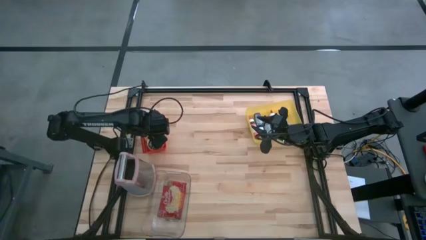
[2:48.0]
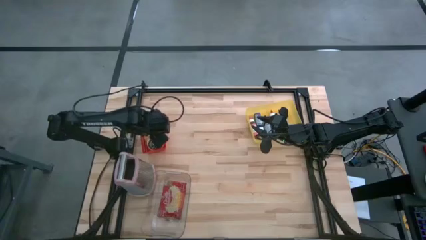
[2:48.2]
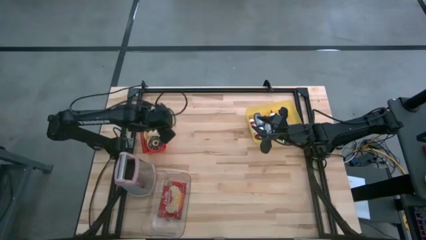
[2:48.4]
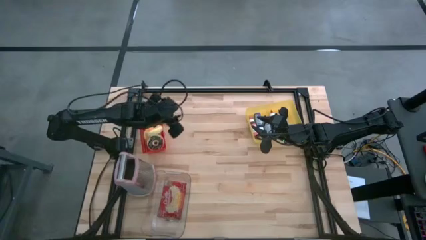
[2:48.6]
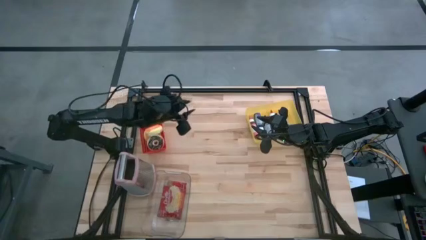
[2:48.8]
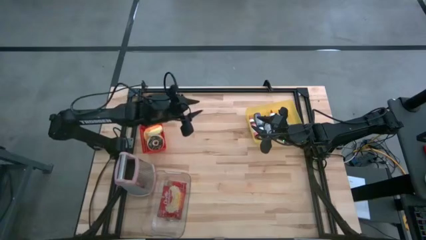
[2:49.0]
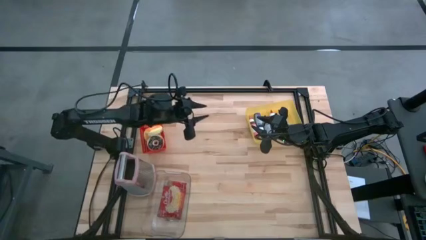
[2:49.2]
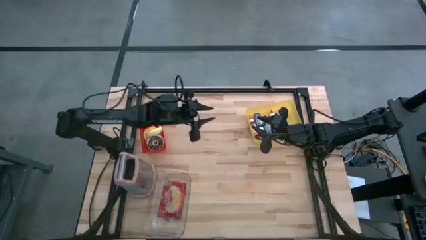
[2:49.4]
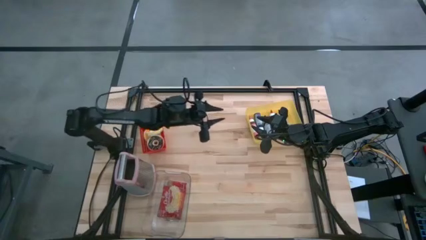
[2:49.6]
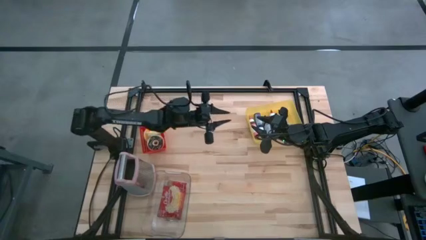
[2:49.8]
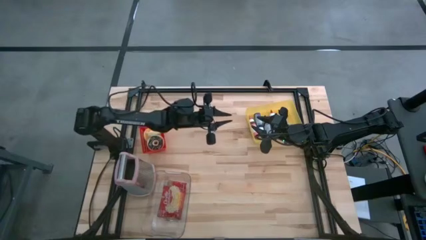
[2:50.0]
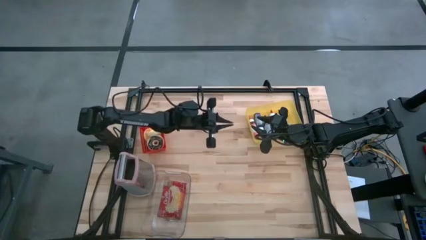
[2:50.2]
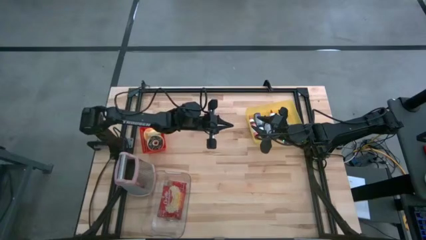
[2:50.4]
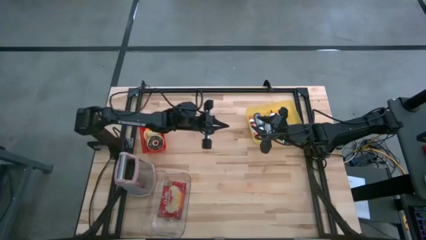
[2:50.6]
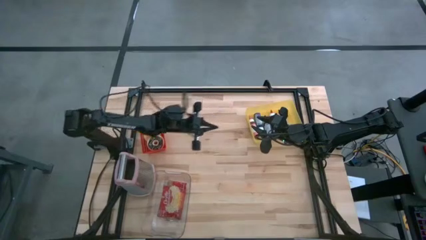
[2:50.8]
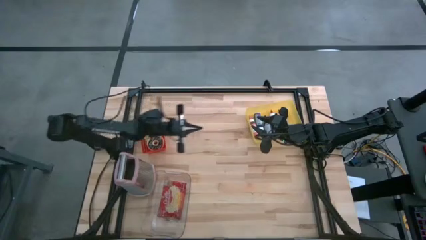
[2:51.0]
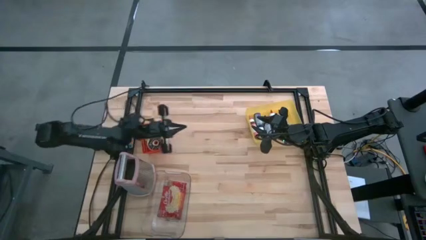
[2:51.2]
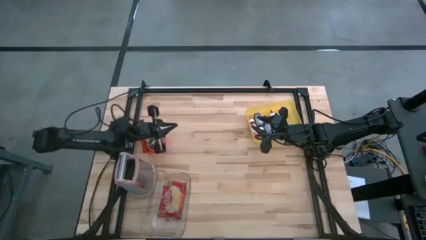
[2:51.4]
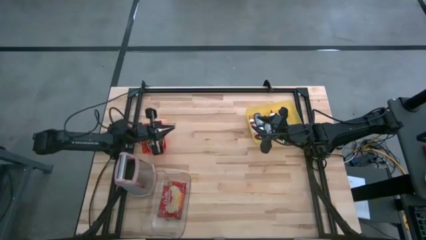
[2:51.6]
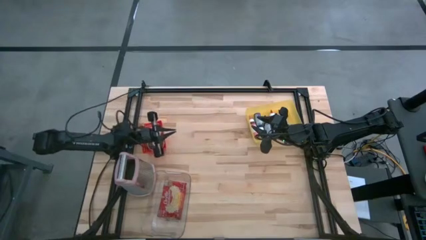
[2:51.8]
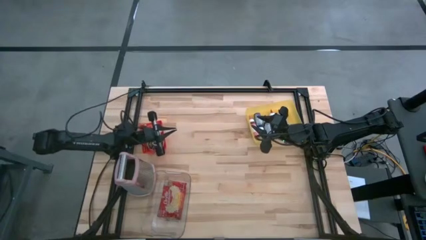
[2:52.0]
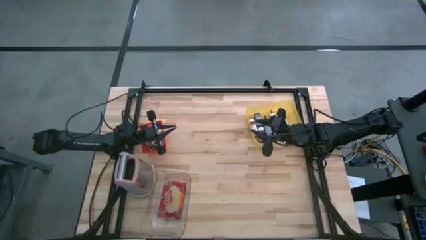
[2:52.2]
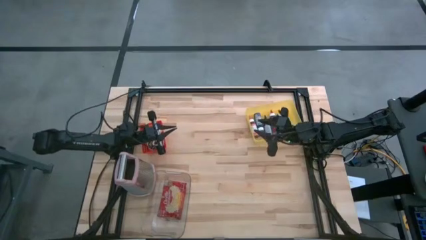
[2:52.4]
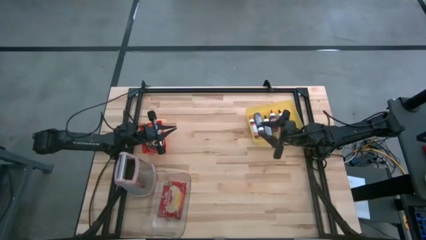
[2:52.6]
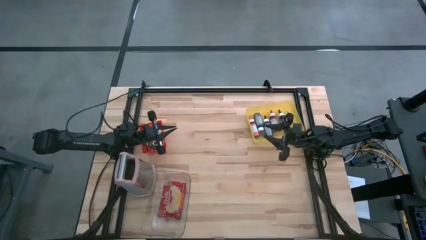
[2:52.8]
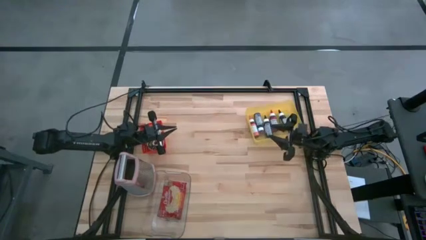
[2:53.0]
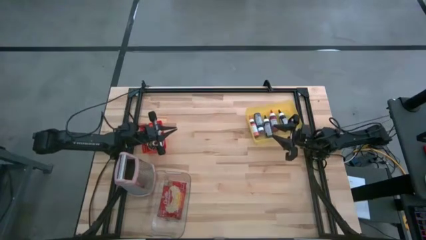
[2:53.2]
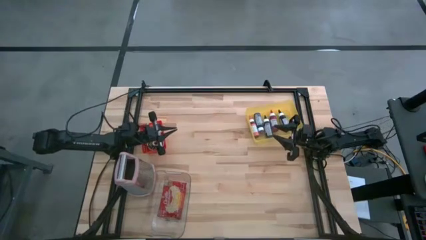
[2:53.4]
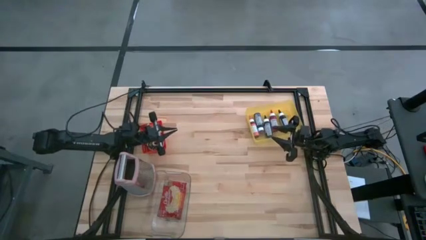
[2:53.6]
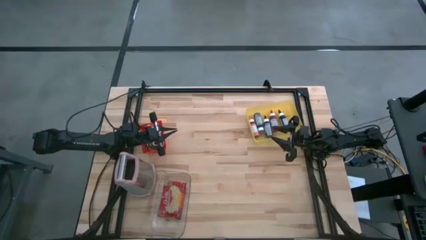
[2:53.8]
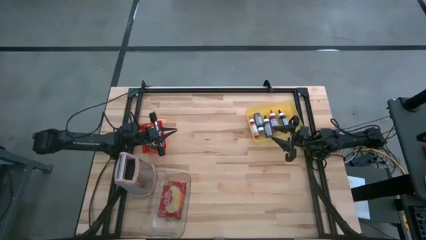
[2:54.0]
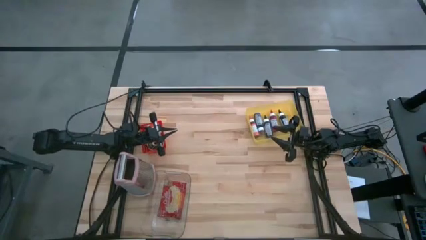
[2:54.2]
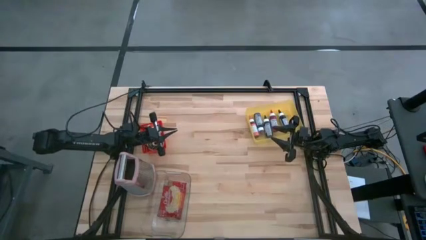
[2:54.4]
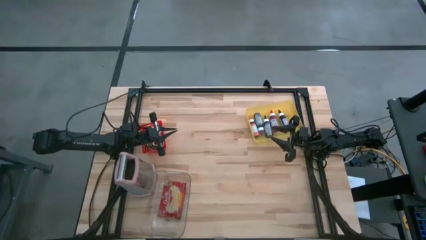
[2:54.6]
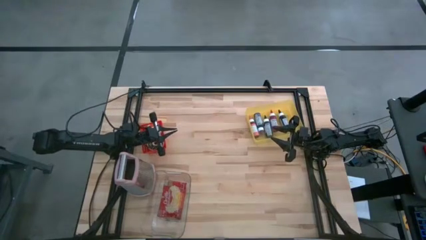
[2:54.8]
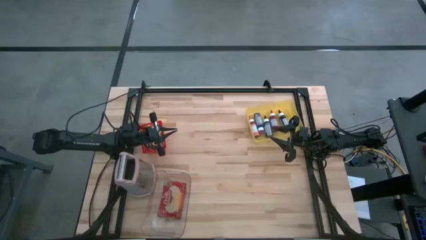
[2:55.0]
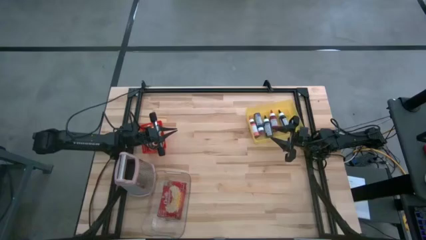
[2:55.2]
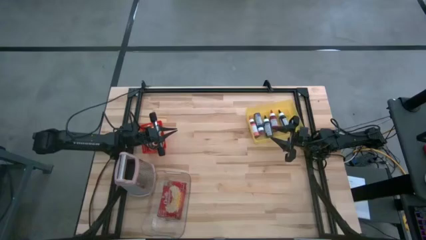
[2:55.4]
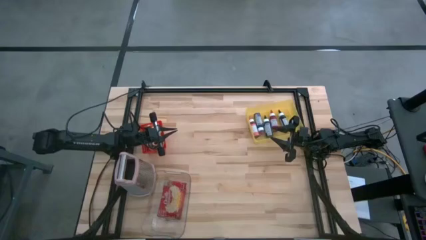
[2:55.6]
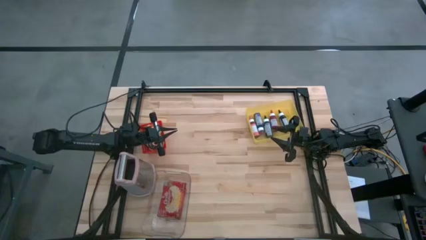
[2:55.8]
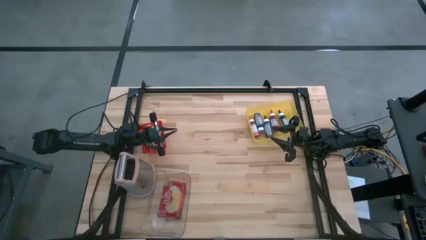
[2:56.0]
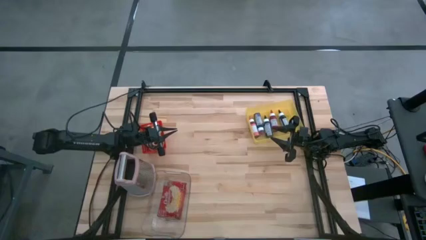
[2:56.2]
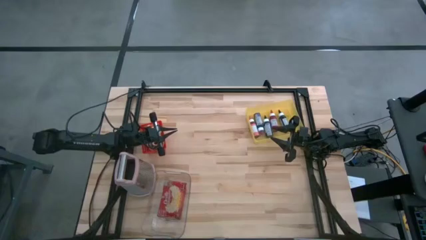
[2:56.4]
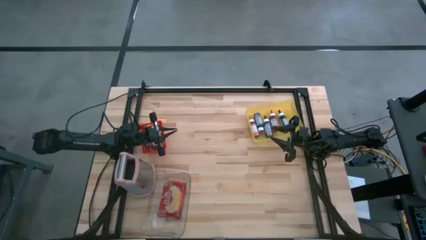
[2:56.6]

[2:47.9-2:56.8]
Task: Pick & Place Food Item
Return to Home Position
